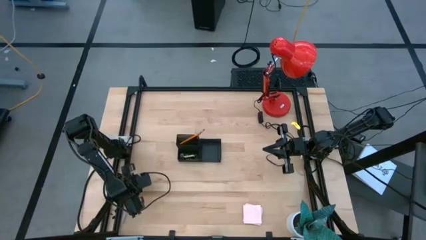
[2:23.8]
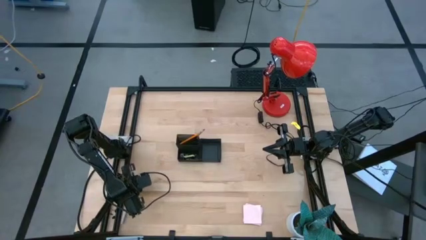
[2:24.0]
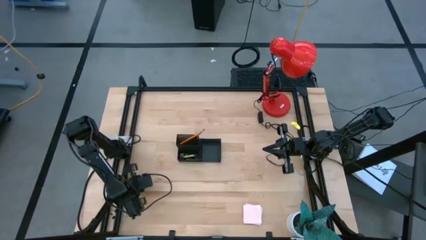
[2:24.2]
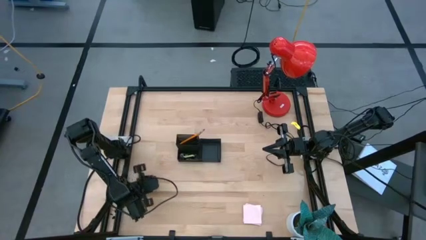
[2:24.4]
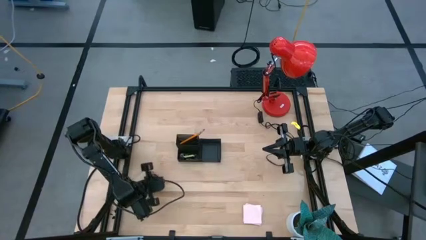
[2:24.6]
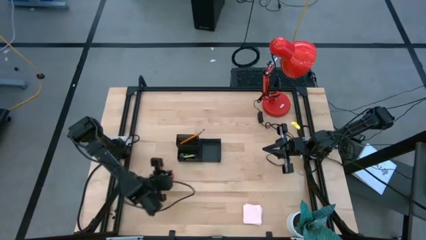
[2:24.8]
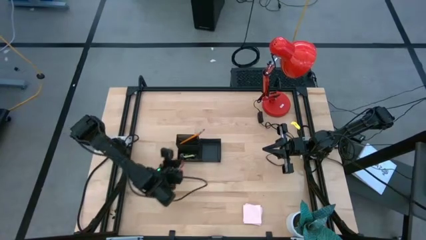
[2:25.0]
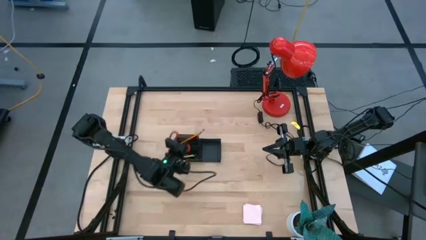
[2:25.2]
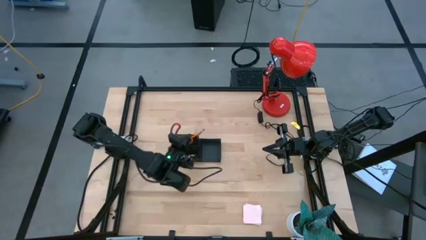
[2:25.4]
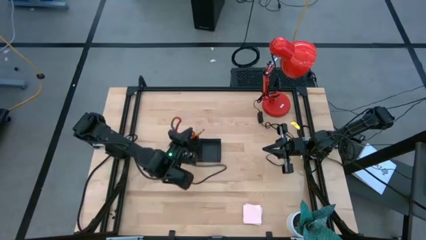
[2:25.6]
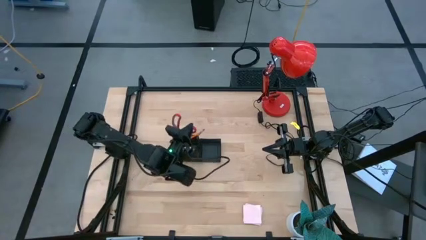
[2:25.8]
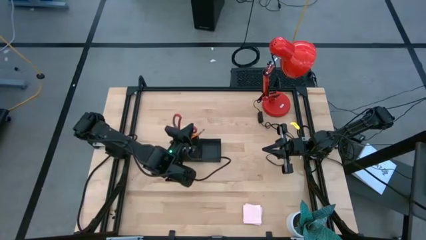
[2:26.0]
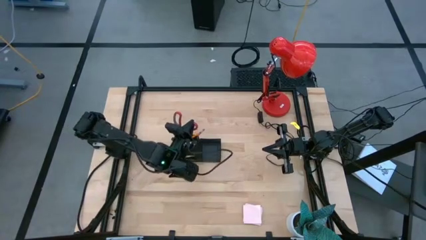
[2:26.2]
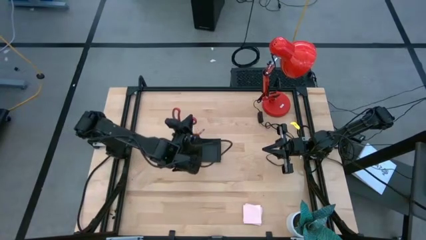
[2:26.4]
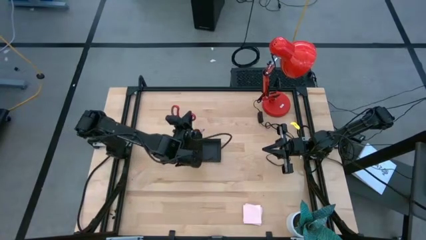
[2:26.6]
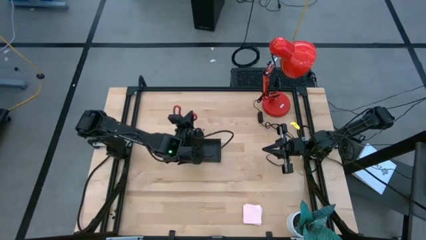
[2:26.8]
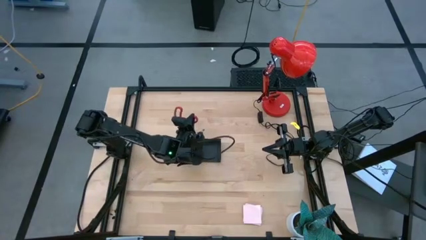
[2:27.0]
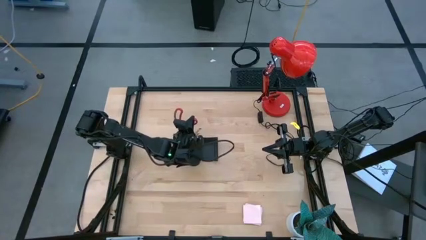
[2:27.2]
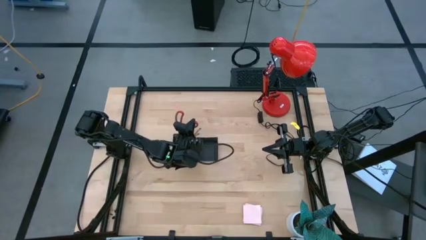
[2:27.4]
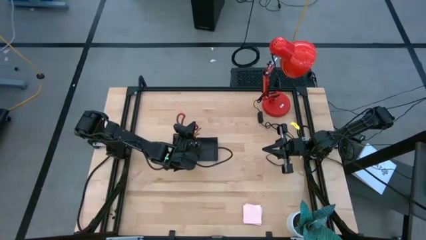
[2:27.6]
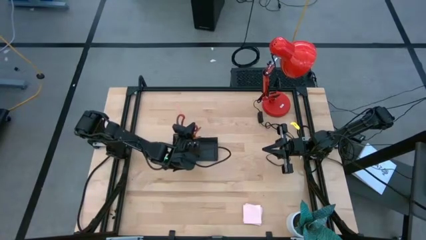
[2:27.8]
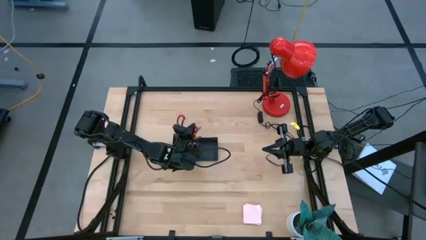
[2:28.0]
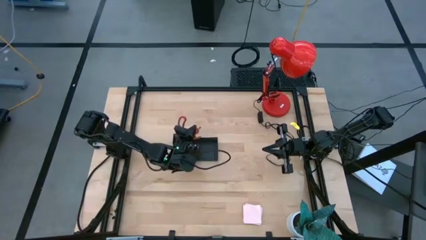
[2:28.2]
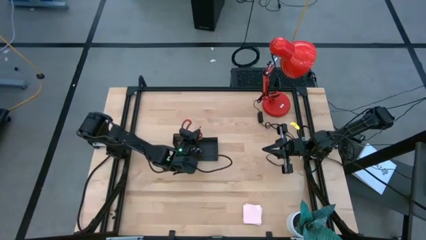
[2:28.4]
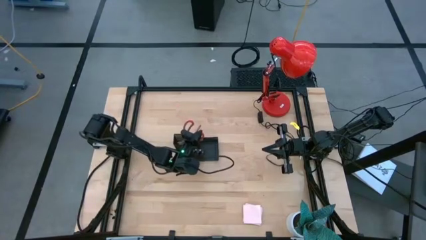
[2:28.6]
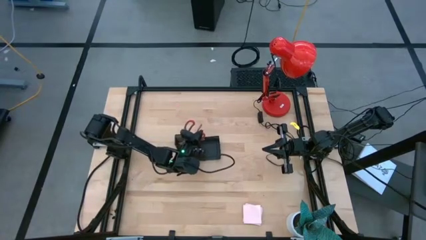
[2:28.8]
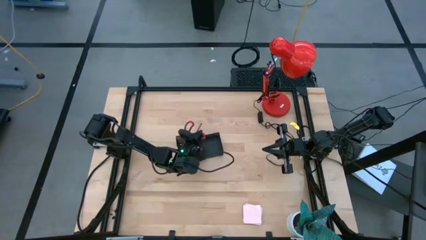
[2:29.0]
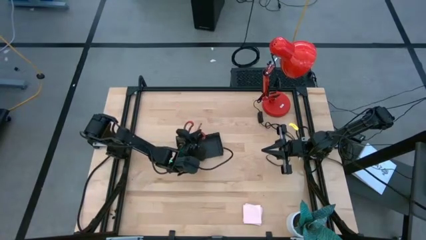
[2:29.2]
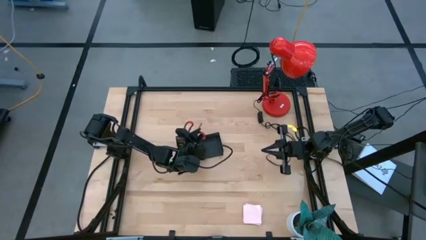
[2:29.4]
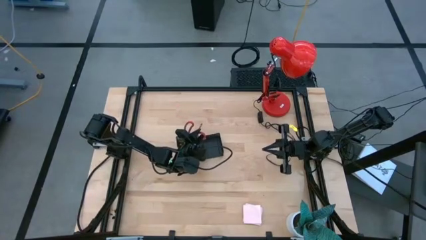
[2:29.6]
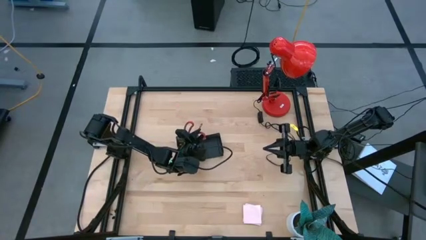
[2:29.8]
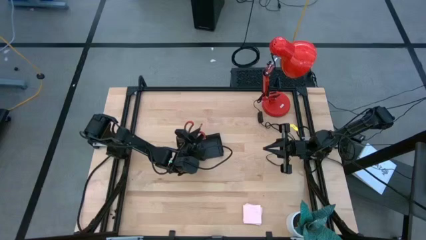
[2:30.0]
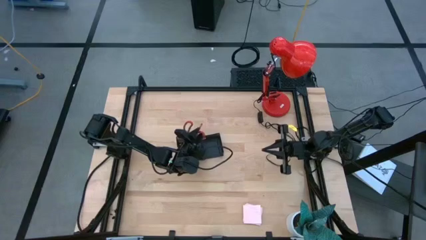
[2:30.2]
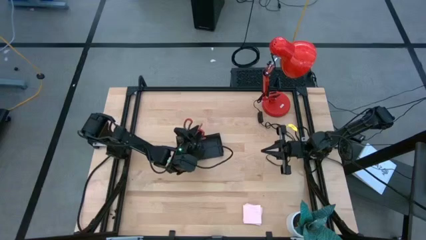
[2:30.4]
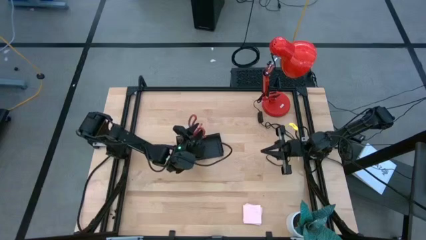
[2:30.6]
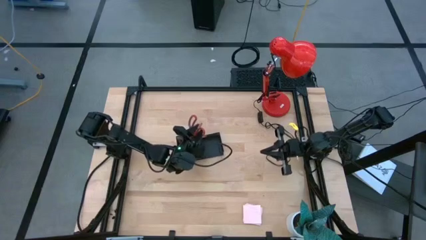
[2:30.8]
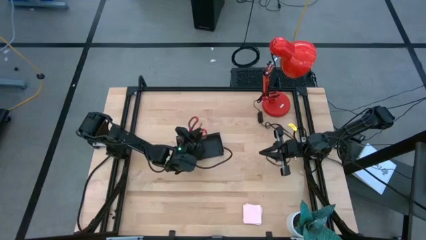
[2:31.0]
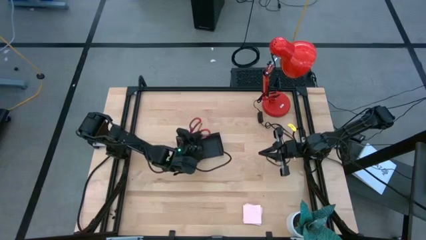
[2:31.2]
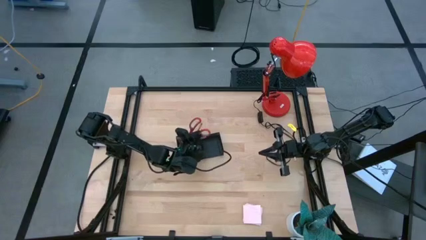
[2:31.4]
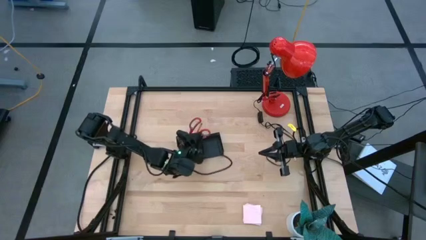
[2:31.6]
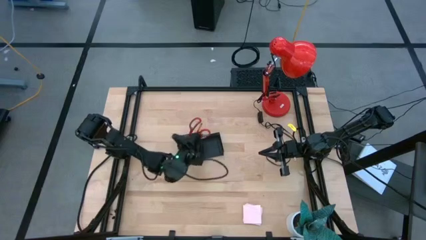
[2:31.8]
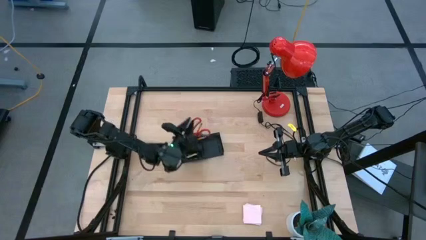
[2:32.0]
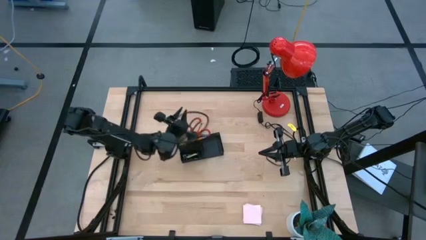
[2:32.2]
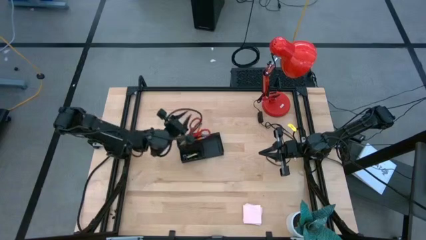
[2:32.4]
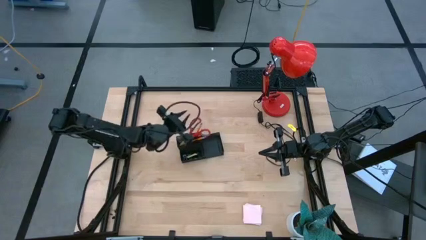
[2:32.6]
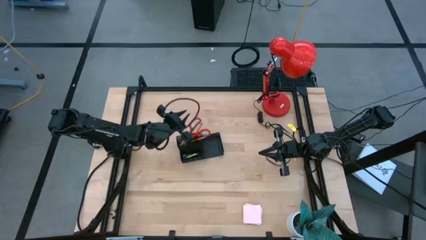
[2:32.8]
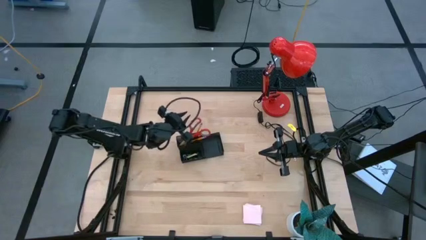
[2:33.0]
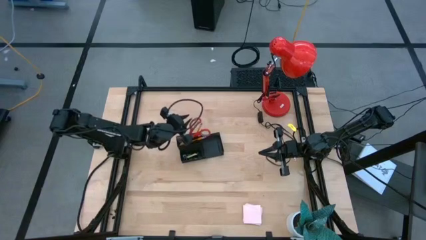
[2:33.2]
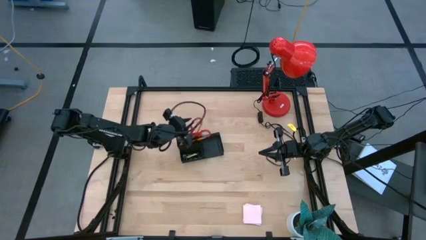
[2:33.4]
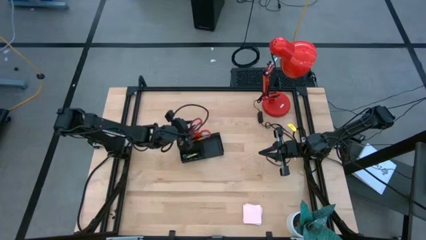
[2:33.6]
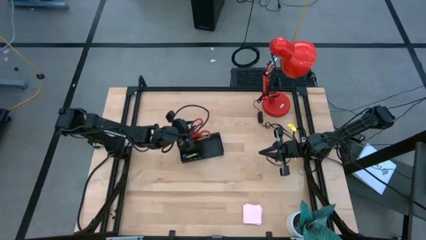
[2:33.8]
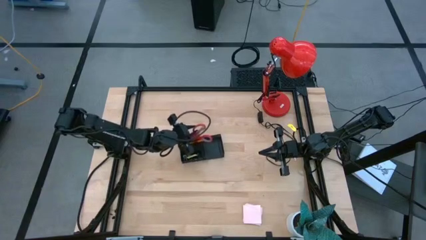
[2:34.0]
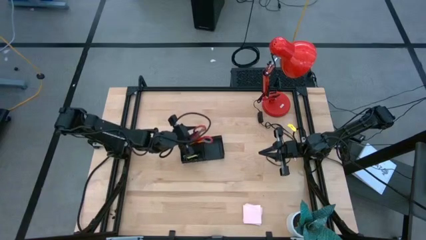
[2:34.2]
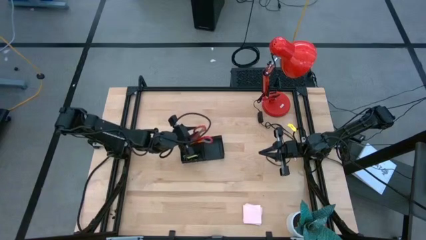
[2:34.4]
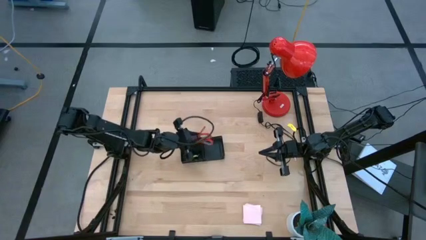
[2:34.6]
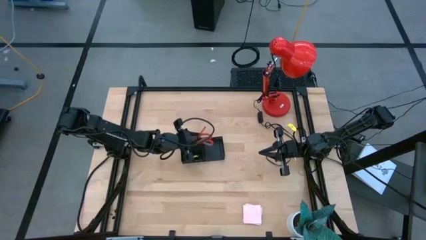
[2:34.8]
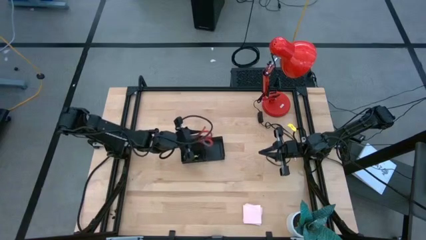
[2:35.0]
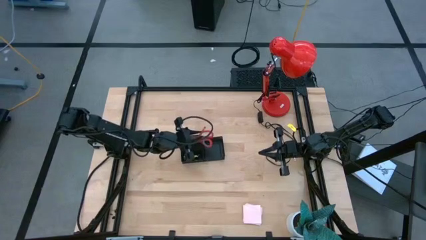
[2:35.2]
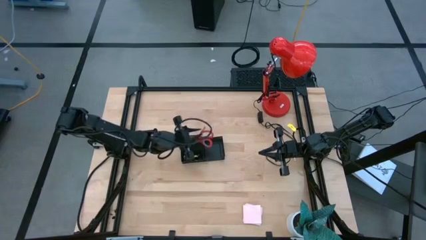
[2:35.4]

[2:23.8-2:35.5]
Task: Pick and place office supplies into organizer
Put the red scissor into the mesh desk organizer
